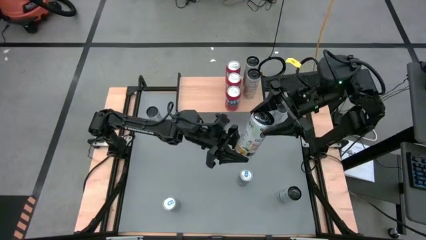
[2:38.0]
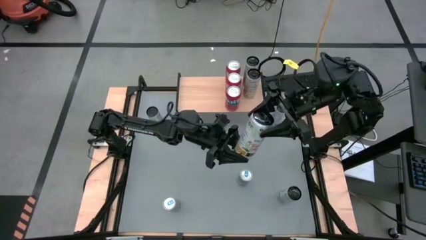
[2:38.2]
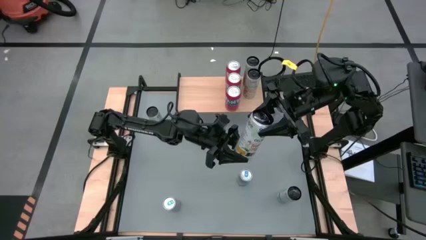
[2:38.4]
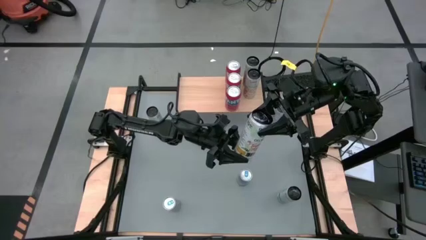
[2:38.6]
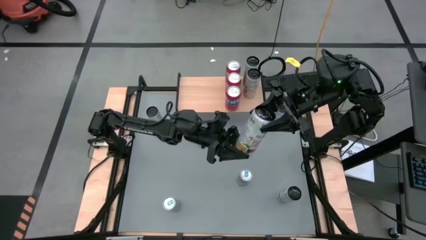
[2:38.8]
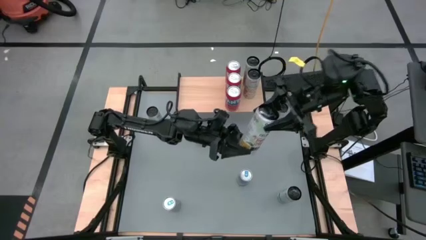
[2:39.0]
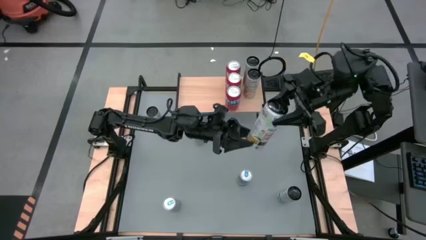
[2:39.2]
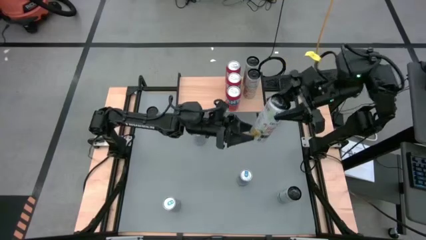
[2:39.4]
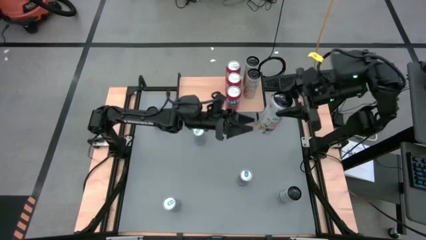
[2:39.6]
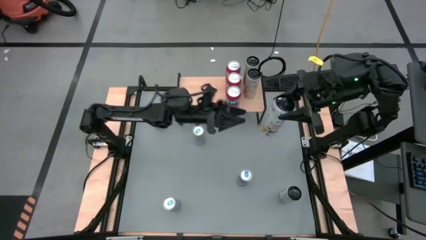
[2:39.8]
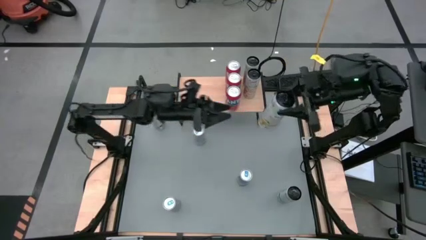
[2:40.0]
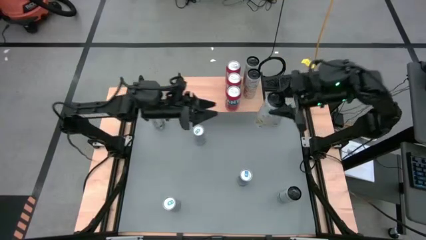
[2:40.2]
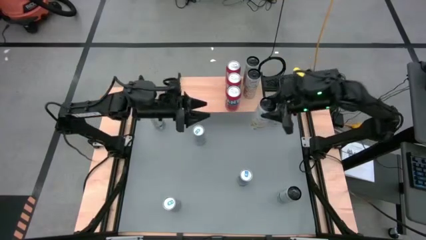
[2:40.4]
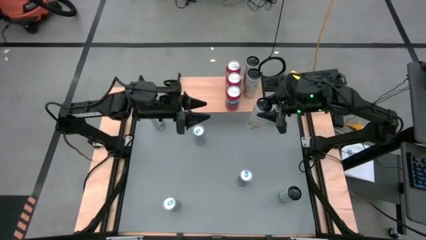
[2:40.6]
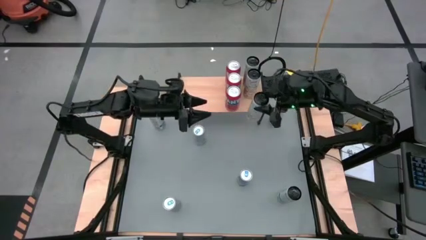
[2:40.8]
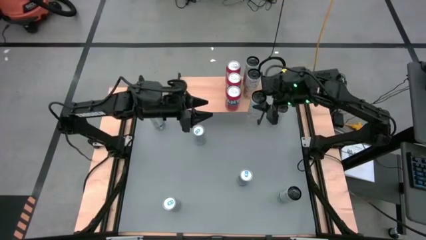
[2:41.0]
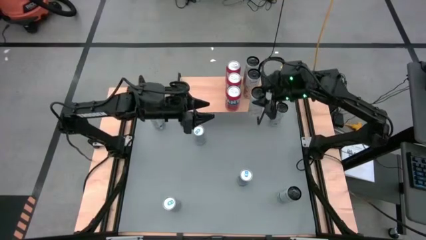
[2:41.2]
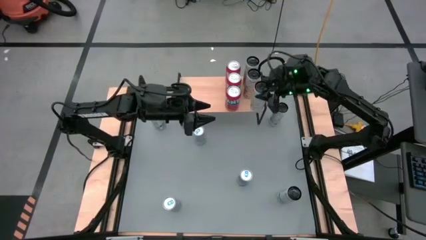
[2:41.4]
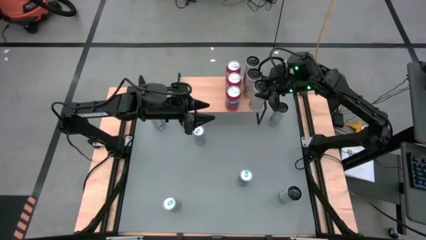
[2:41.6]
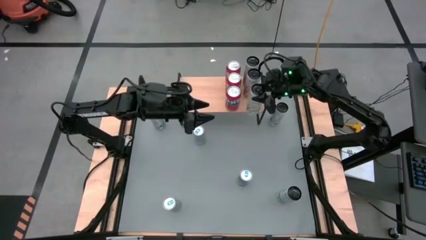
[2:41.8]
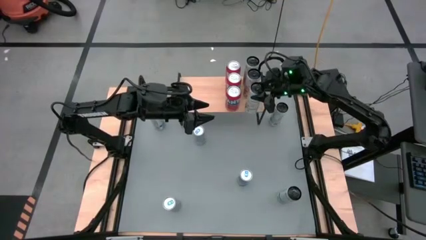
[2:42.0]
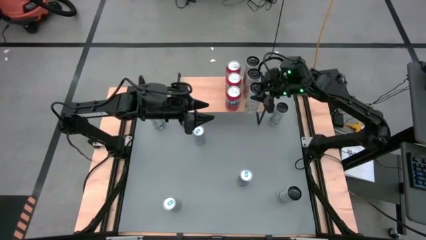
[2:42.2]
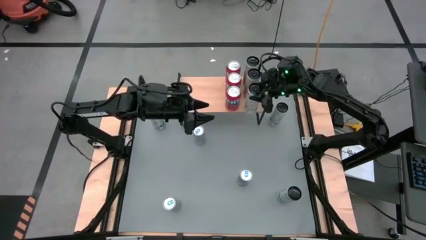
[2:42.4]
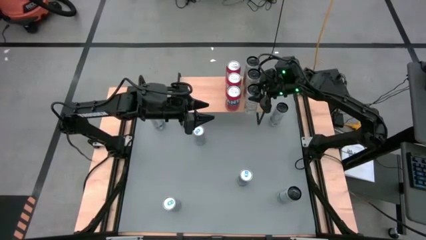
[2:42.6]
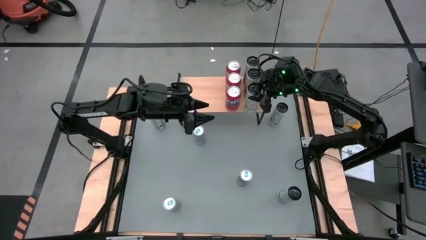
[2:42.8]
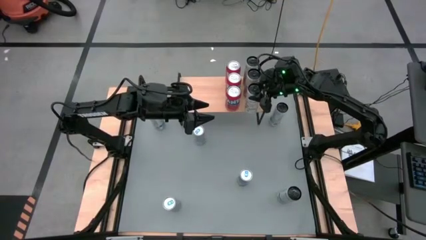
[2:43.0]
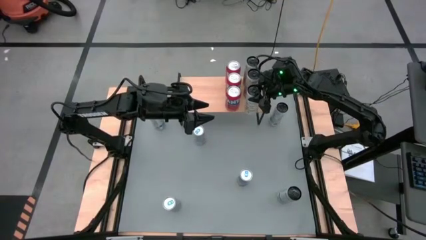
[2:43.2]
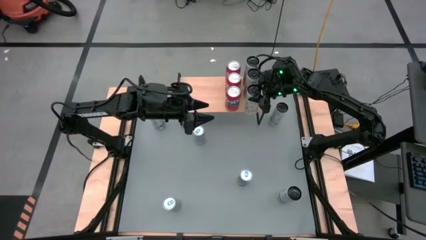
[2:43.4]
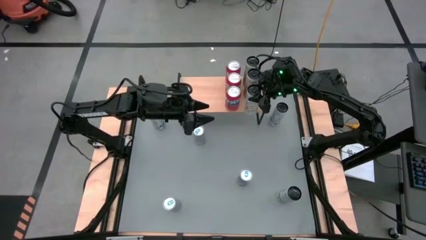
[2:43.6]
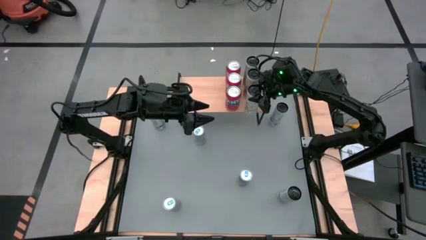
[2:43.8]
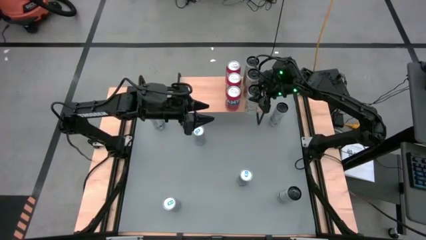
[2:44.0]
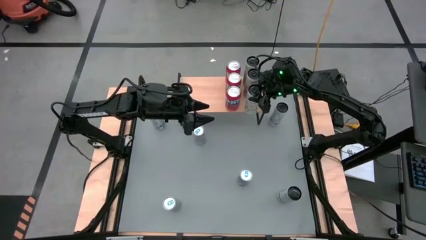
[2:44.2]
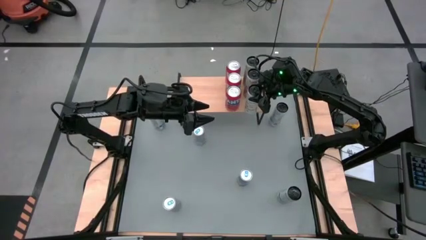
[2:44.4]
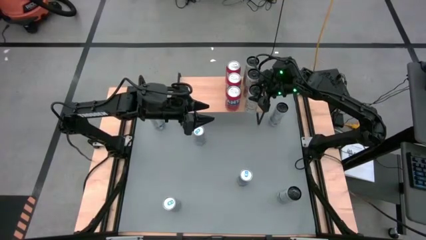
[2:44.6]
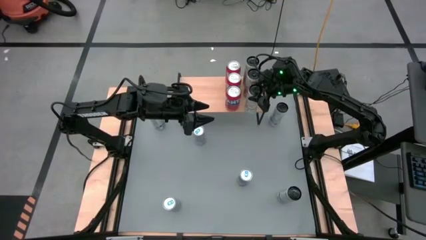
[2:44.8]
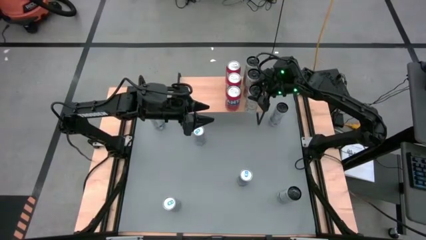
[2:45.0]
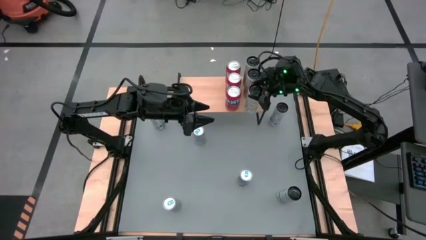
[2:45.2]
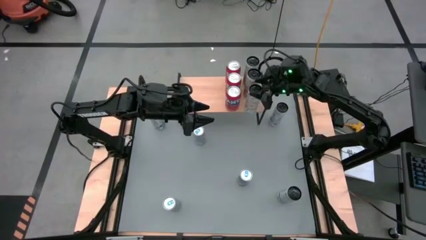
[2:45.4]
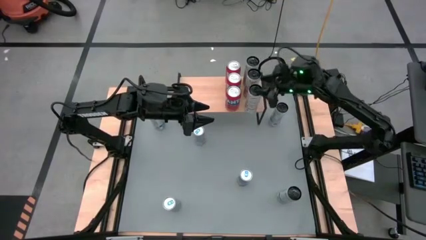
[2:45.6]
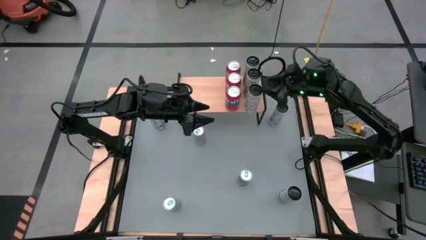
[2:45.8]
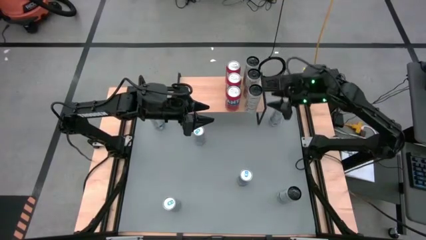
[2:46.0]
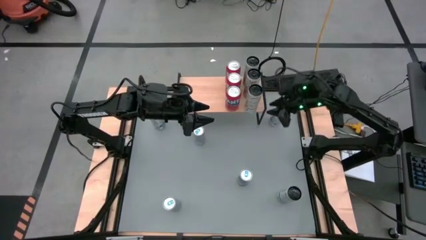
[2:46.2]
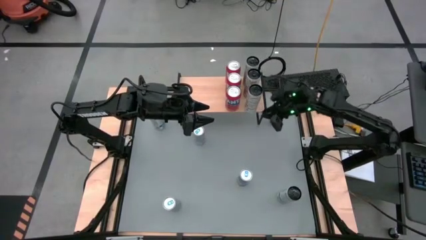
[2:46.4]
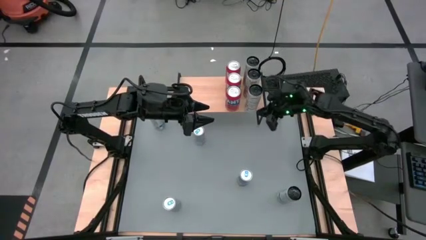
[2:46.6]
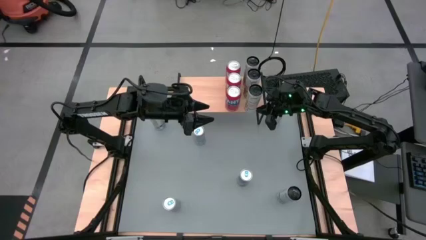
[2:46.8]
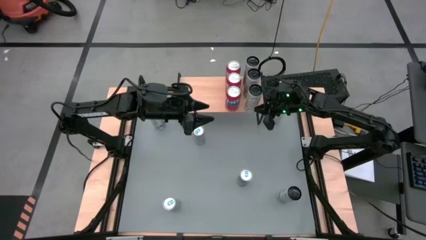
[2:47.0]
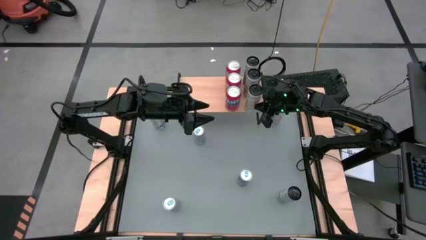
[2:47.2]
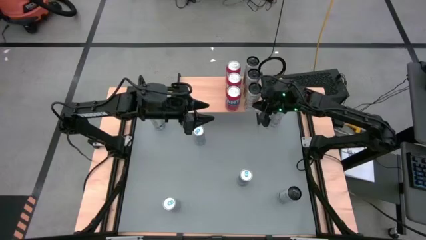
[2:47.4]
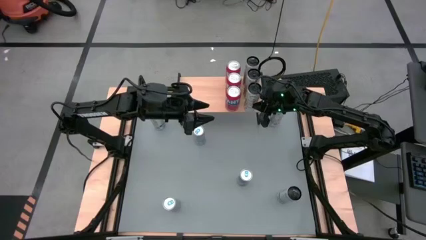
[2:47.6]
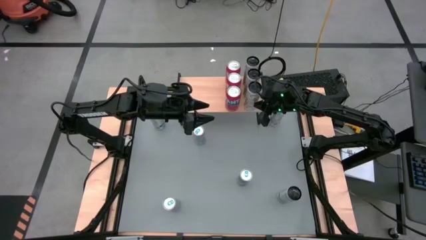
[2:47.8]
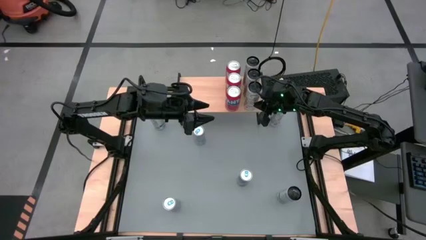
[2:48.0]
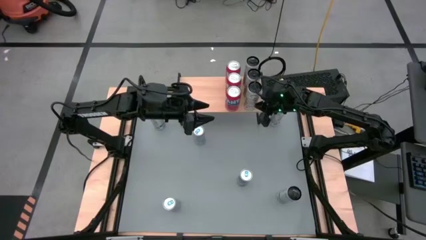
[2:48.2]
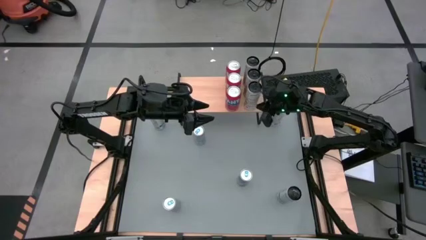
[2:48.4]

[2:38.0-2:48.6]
Task: Place canned beverage on shelf
Put the yellow soda can on the shelf aligned with the other yellow soda can

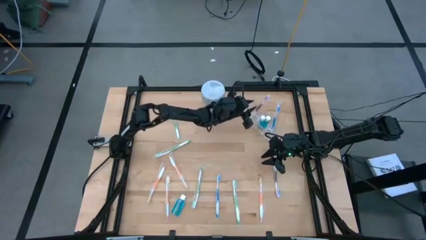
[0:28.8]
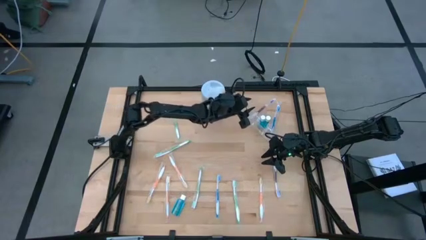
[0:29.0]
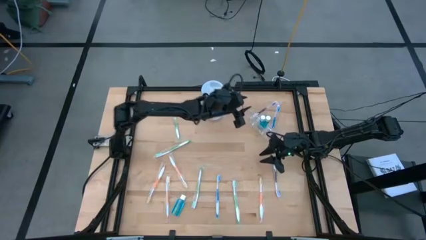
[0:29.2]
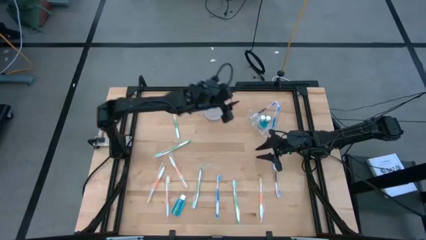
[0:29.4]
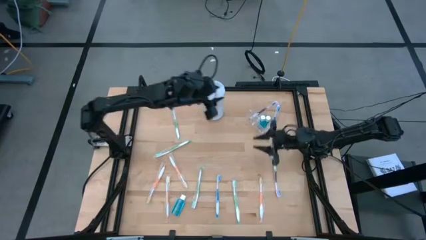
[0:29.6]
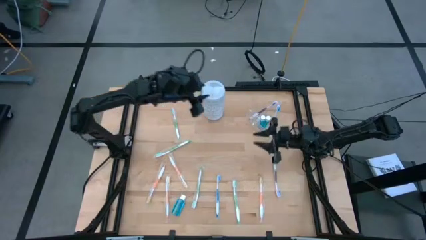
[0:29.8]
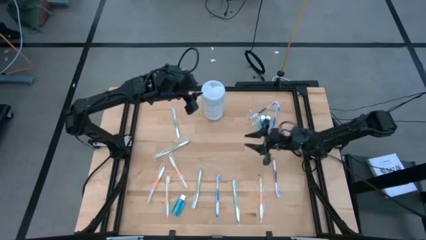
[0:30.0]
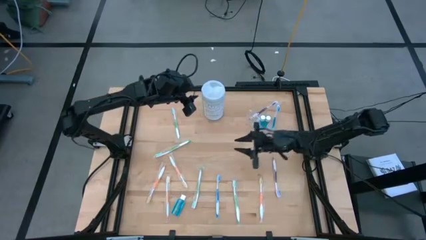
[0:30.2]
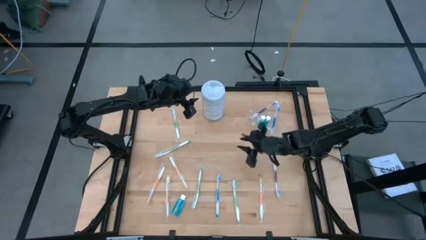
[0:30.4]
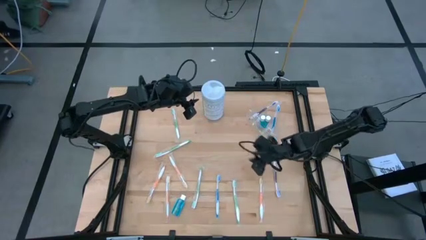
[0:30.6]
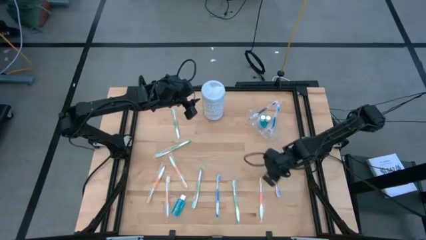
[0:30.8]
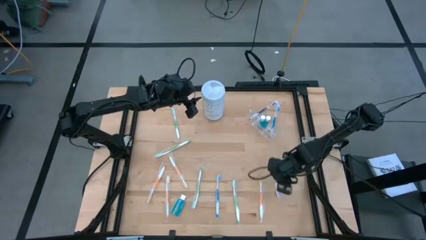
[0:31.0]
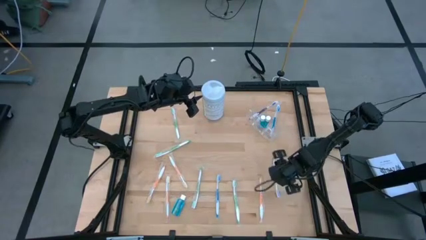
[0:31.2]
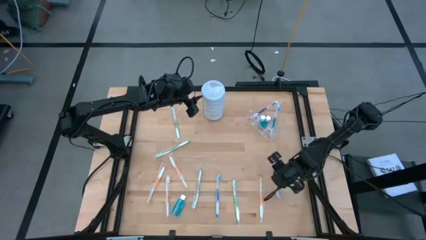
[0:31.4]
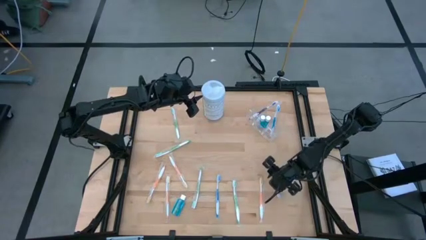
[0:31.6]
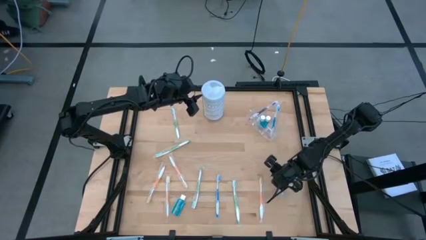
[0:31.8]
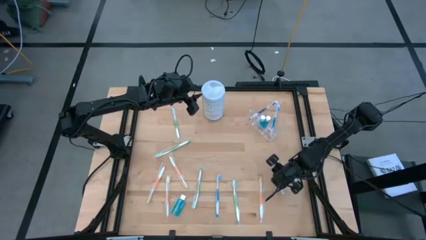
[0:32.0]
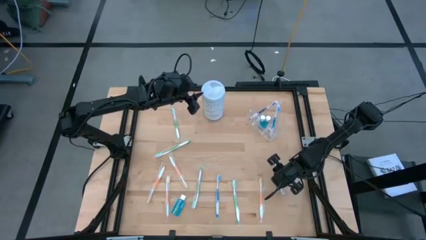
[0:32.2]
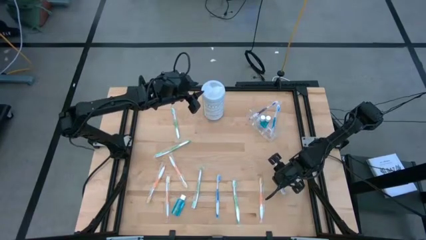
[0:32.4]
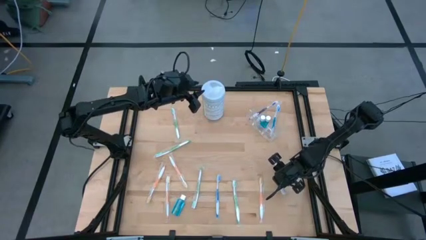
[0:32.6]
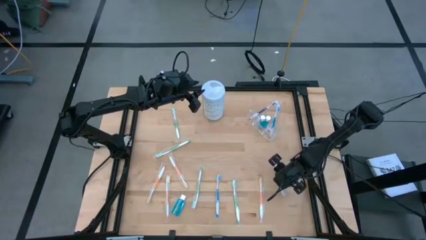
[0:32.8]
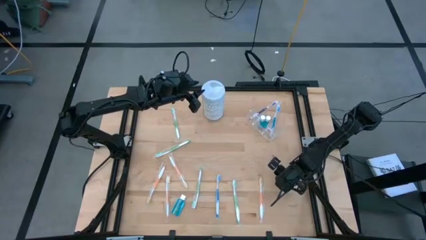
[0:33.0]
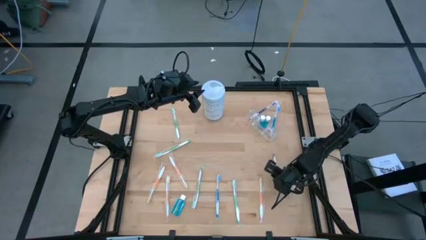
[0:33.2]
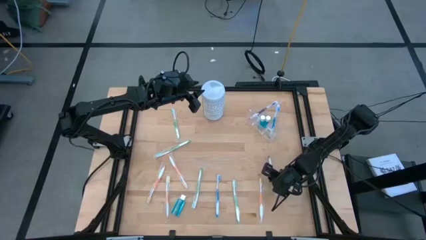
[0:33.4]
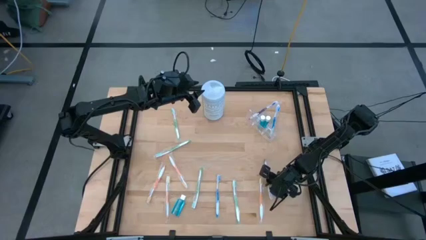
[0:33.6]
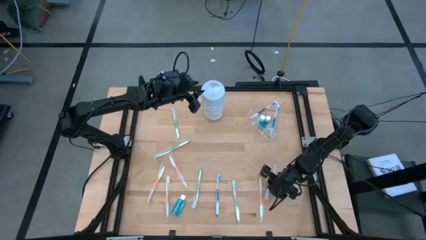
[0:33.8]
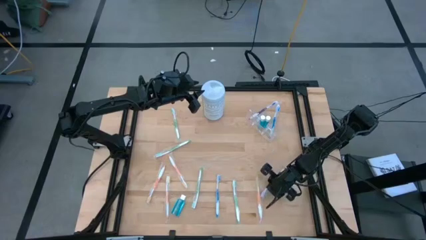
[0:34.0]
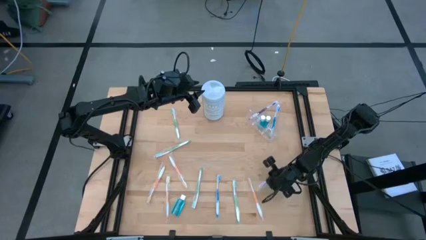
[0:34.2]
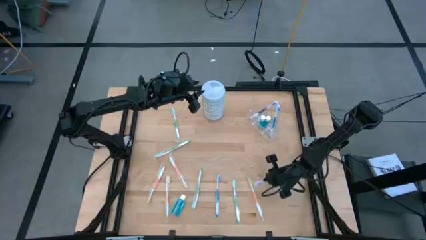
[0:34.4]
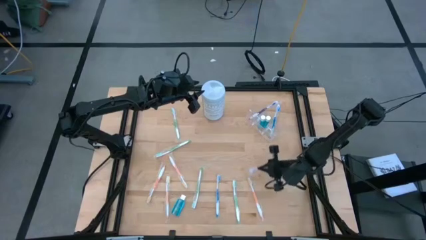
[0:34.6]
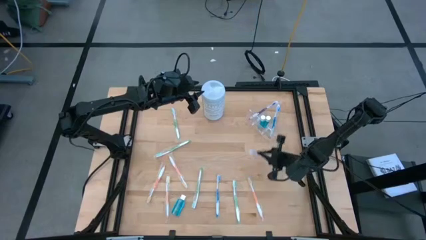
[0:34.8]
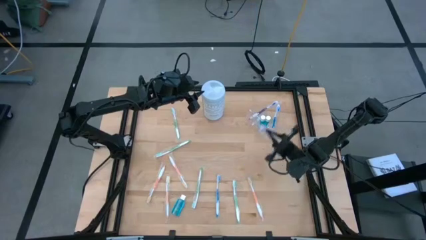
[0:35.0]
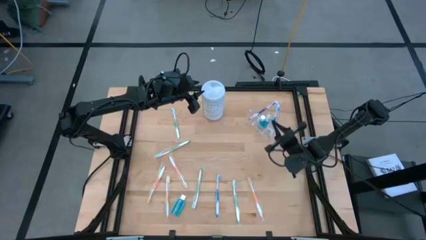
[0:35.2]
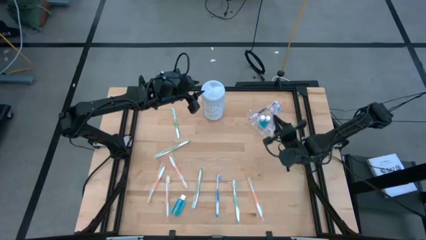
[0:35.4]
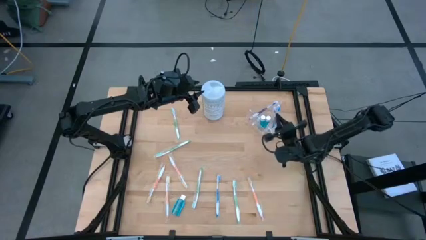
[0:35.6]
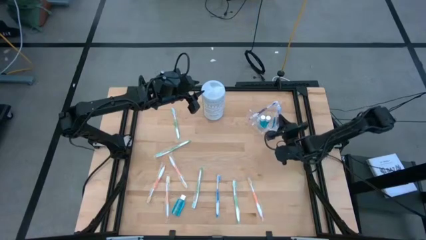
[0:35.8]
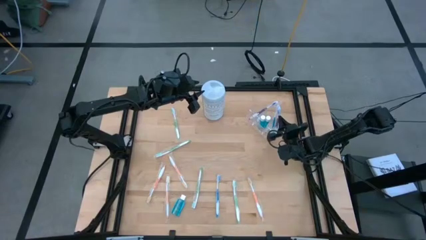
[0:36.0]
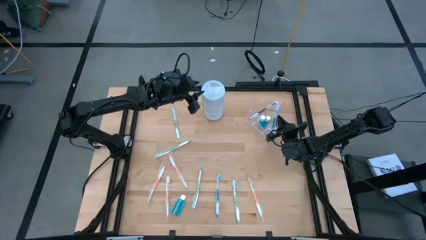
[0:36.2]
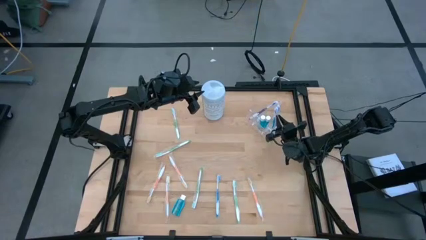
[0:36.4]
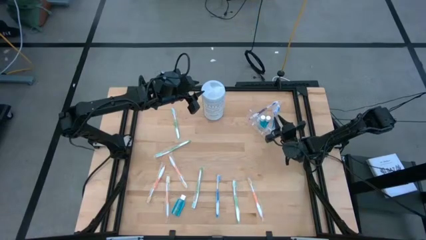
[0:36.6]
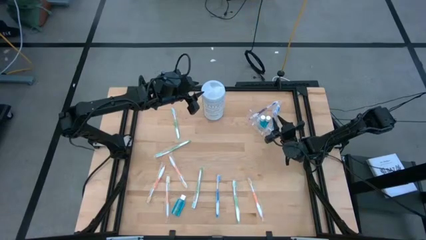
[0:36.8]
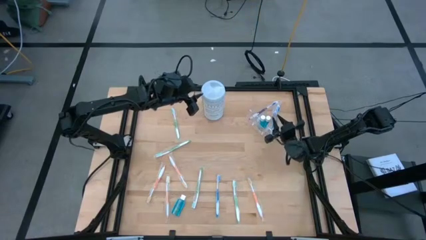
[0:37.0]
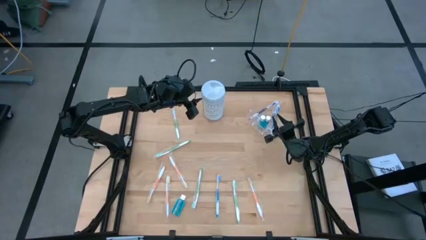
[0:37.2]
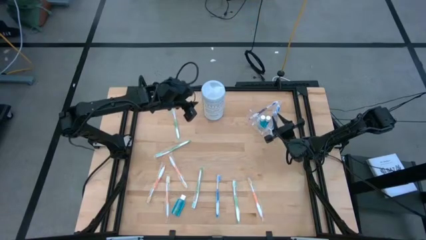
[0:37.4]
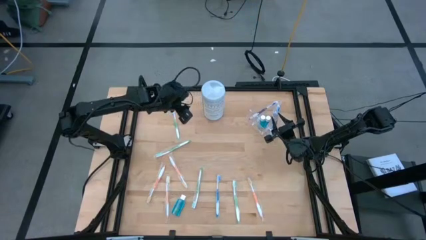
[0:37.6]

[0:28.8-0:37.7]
Task: Pick & Place toothbrushing station
Put the purple toothbrush into the transparent organizer
